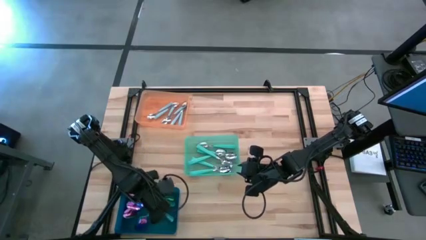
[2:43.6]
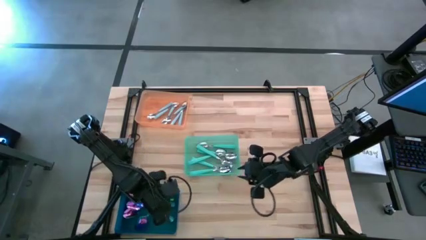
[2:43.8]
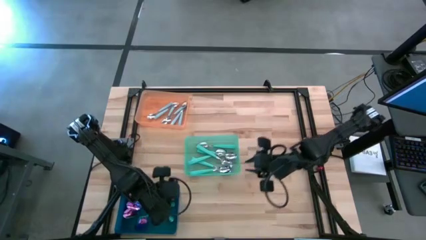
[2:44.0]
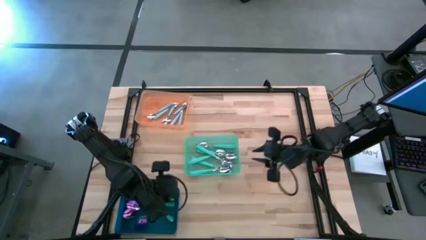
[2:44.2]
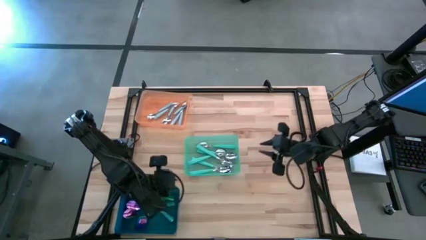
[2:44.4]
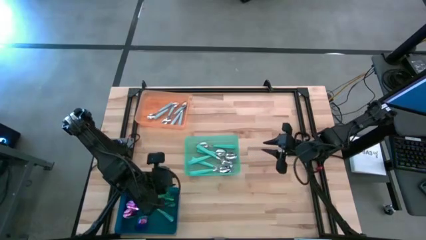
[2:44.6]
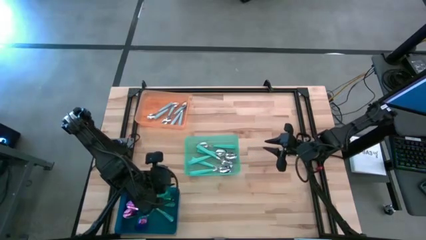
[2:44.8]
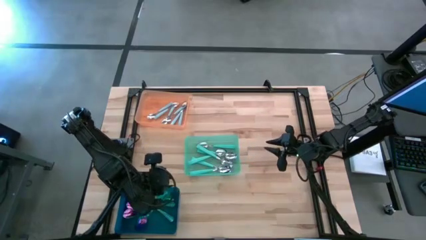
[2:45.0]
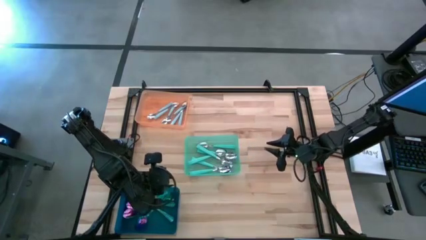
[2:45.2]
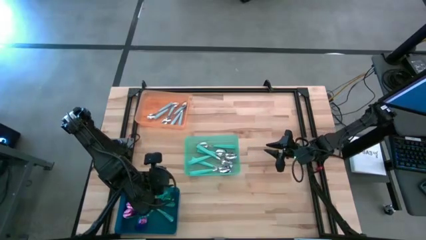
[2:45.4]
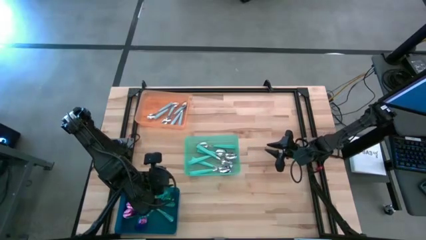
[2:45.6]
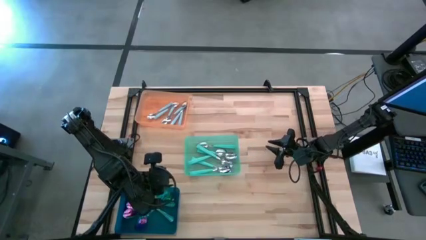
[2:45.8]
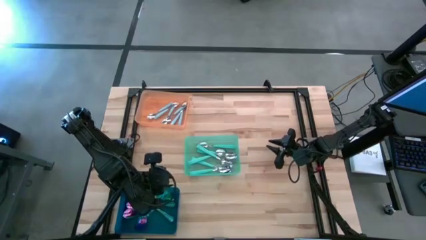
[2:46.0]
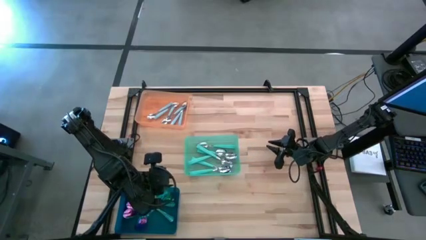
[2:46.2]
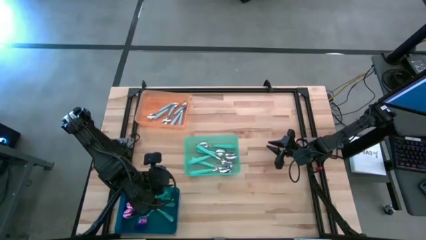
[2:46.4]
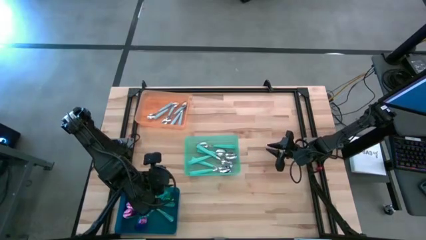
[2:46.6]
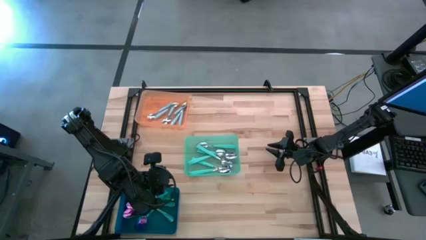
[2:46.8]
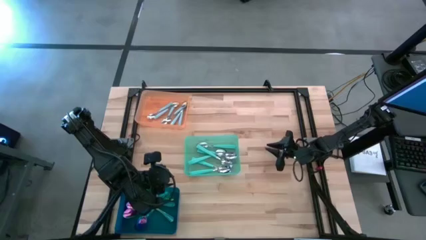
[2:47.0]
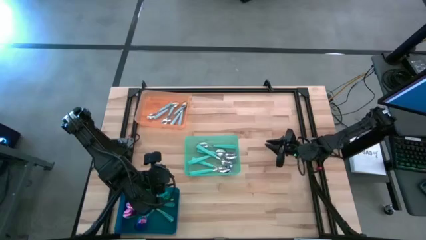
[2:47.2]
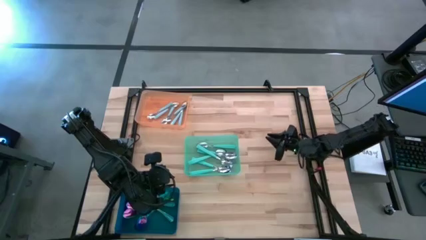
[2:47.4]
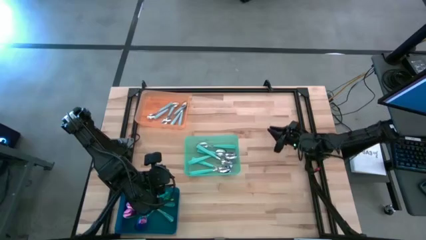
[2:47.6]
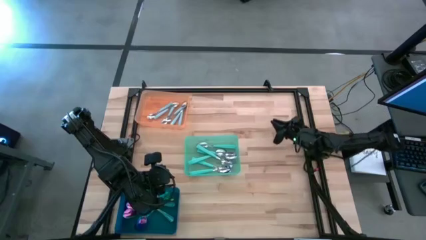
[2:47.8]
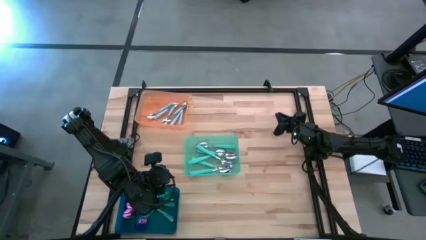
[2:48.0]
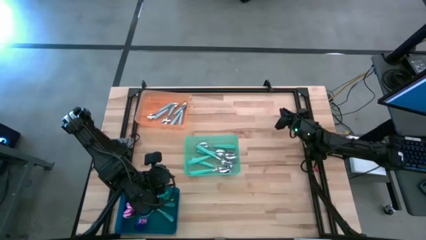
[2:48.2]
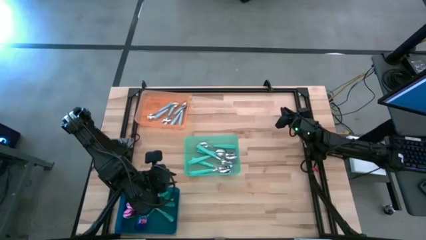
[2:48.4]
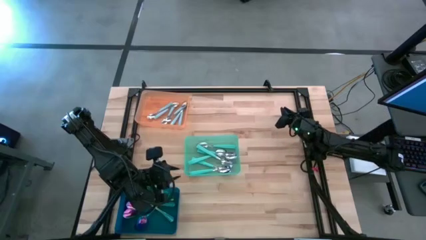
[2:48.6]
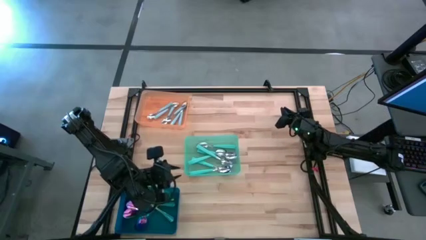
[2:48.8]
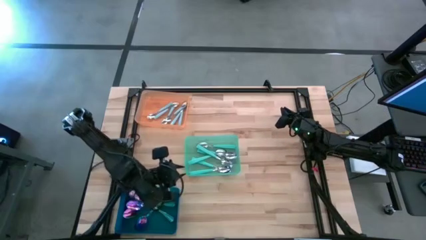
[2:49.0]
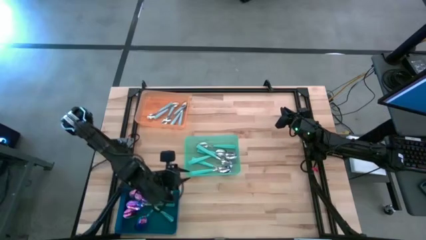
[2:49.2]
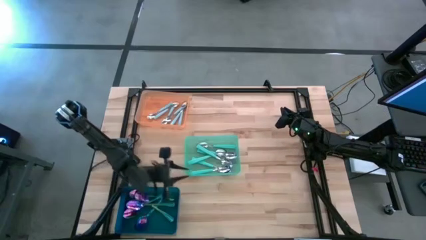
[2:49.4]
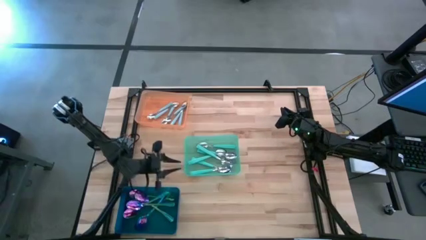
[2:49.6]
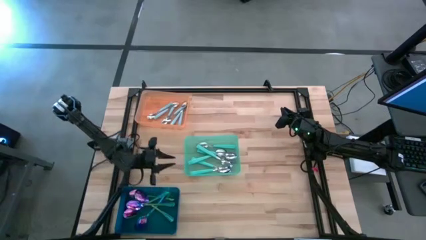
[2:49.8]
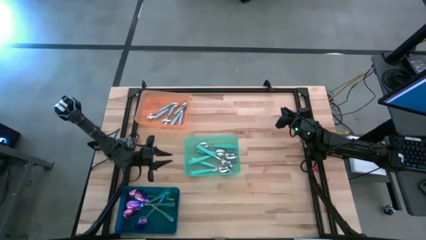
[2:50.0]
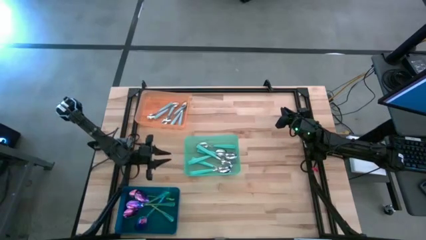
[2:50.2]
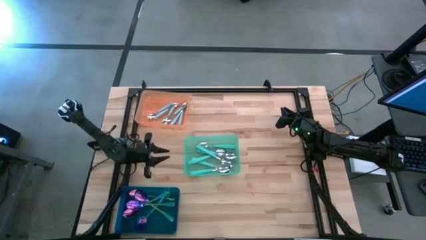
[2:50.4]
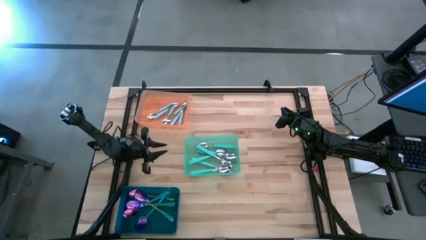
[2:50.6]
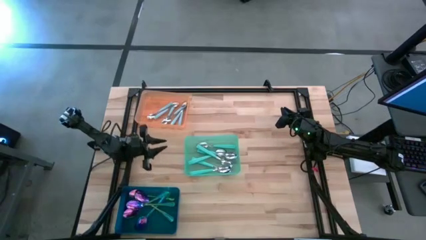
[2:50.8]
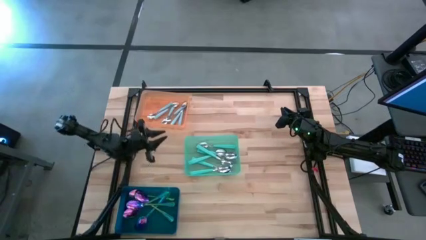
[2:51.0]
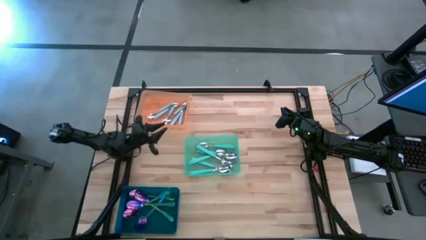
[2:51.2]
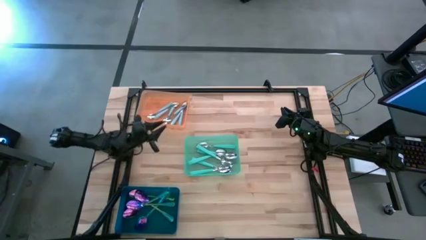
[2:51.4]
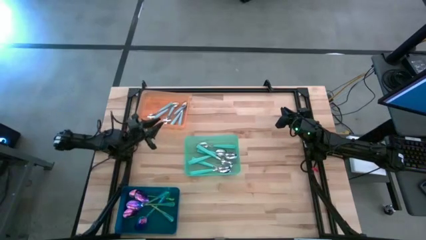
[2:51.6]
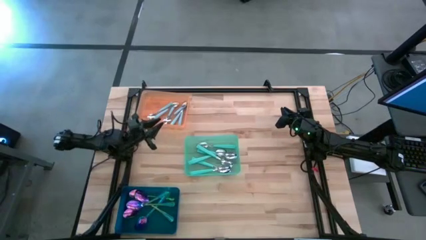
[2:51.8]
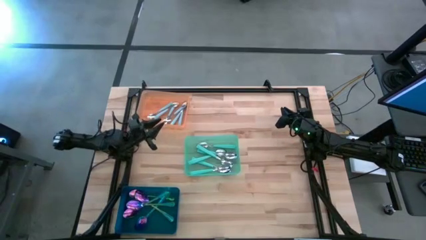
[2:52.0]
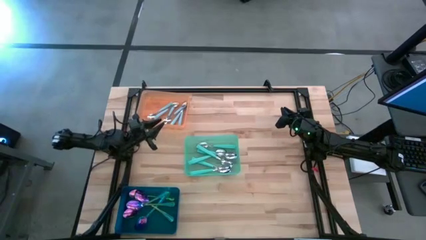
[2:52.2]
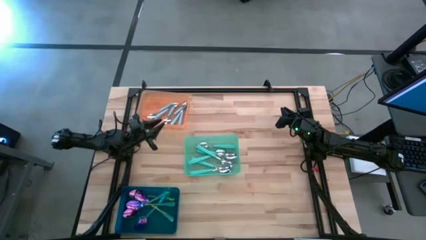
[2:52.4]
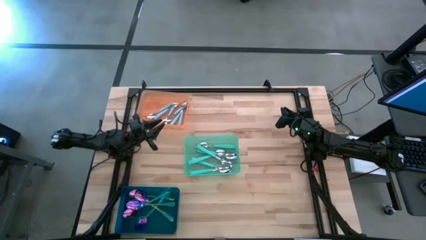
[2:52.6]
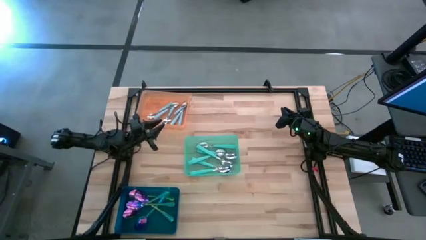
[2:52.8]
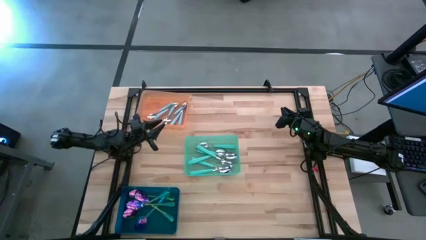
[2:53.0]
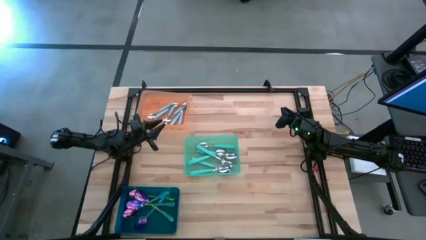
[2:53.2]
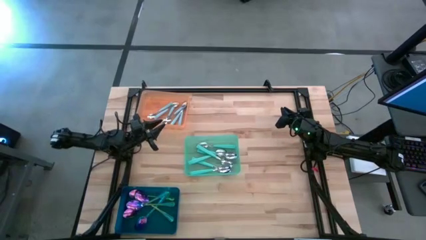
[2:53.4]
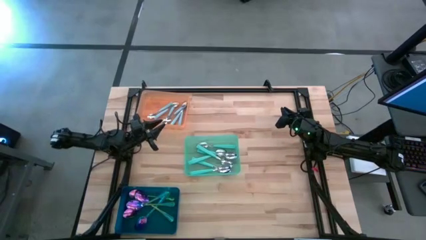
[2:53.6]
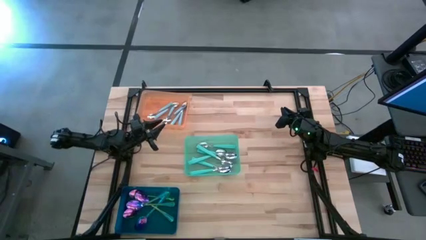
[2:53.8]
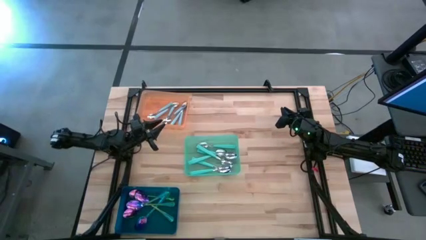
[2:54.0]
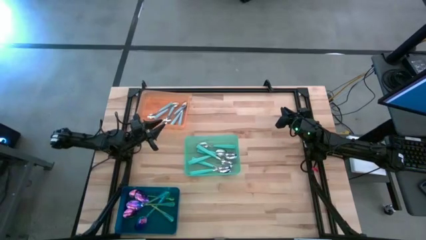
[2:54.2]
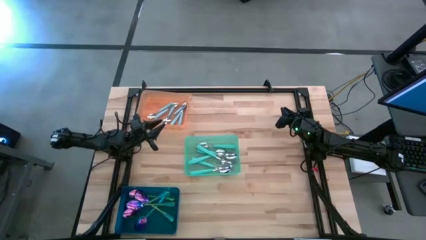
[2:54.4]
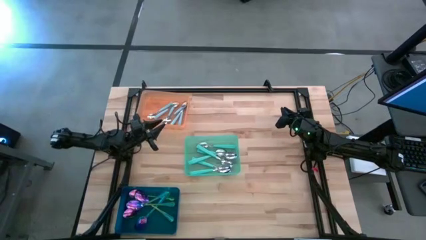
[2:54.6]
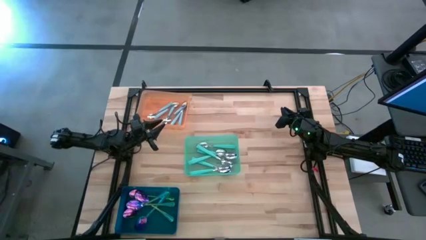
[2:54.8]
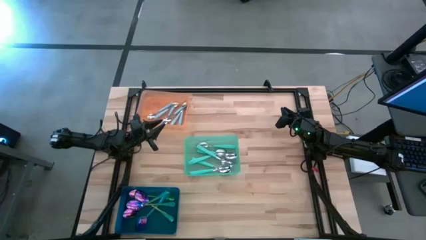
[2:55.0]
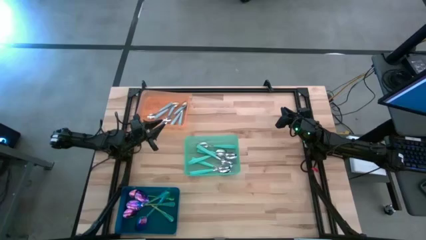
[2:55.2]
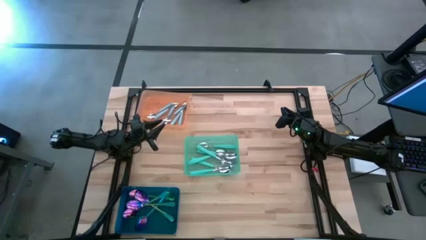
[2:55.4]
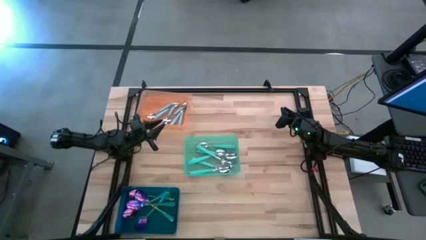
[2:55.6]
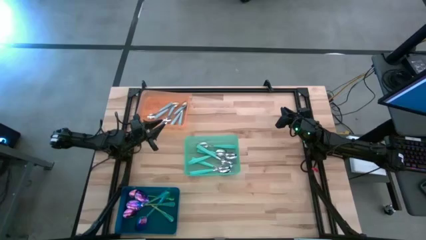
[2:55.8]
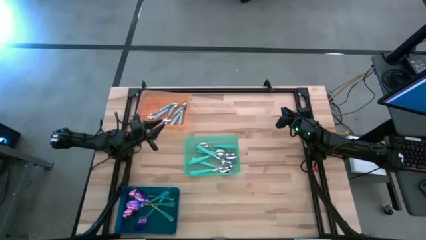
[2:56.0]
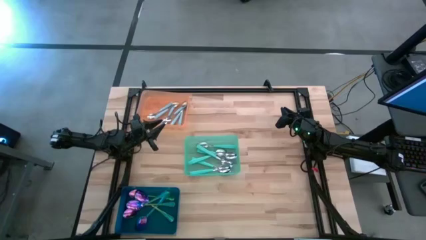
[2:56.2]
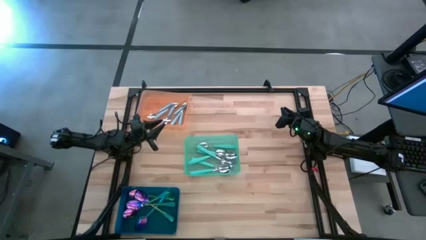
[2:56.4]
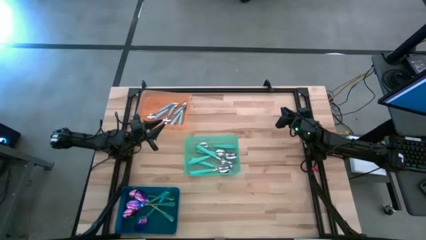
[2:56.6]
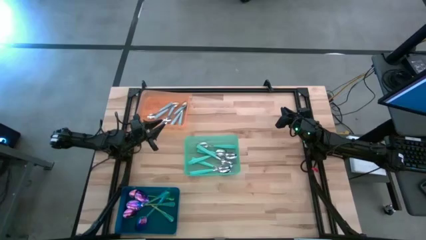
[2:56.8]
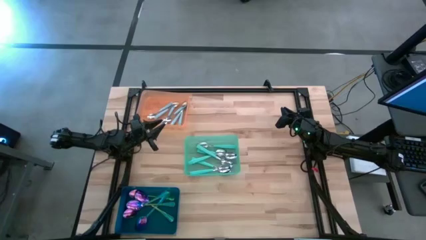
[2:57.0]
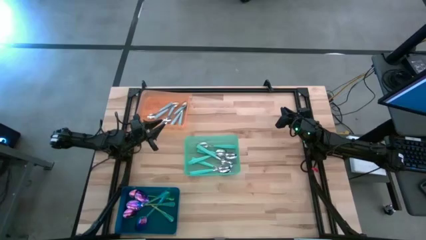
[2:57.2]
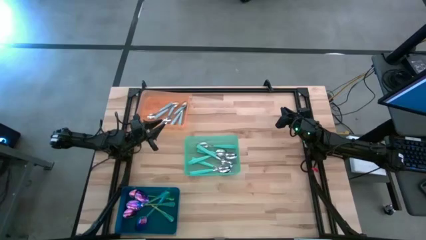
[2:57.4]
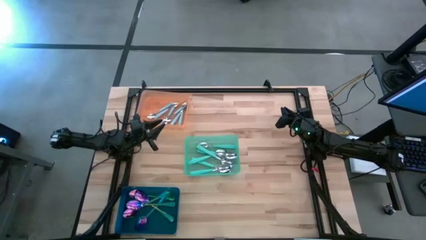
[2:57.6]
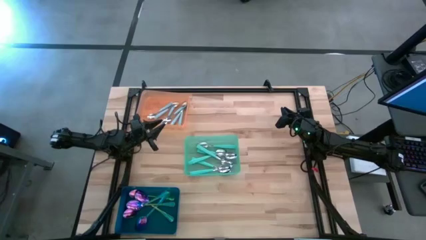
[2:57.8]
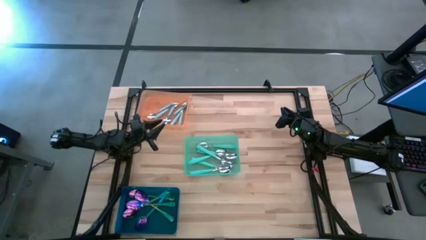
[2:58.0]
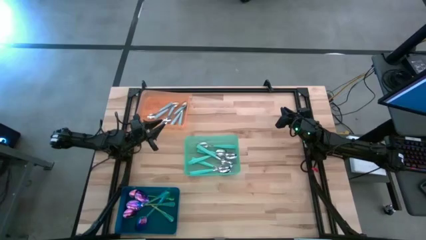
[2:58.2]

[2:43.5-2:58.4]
Task: Sort silverware by color (type)
Return to Home Position
